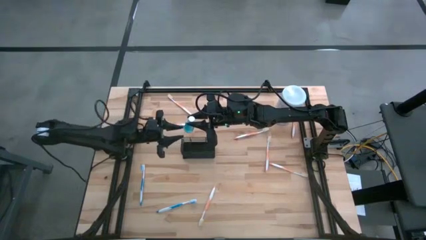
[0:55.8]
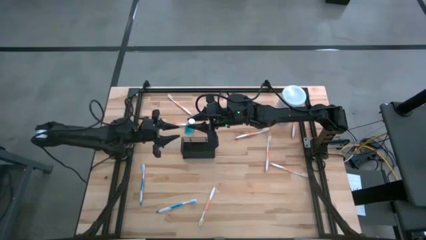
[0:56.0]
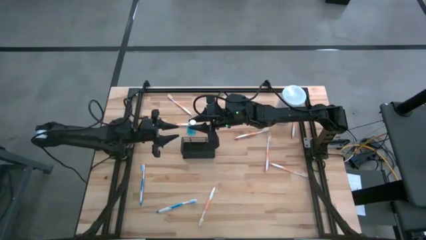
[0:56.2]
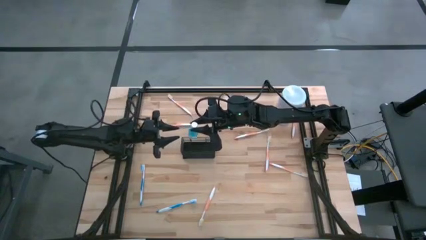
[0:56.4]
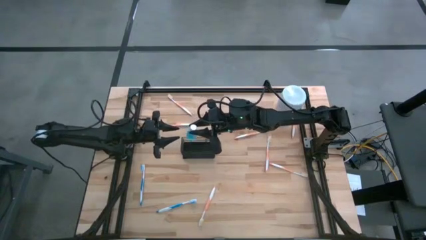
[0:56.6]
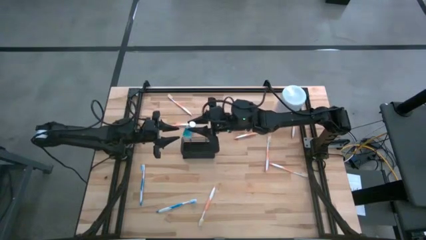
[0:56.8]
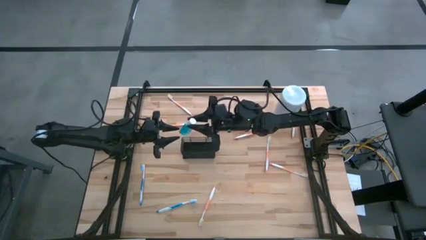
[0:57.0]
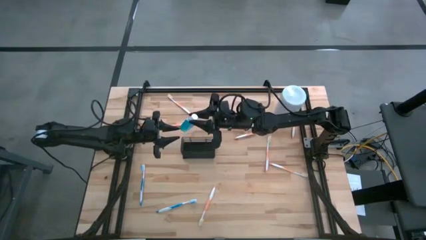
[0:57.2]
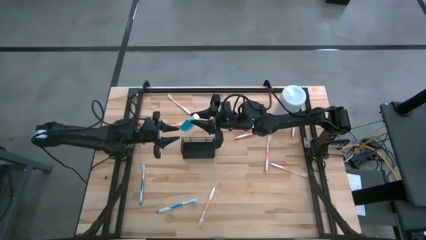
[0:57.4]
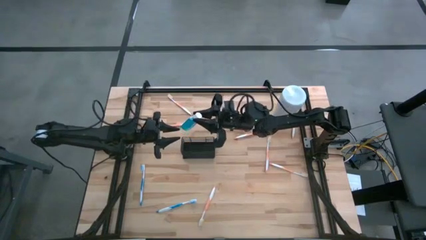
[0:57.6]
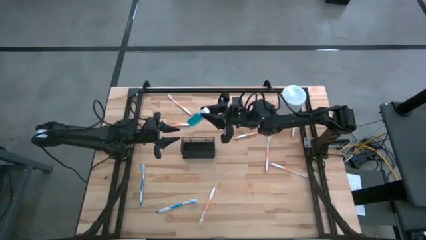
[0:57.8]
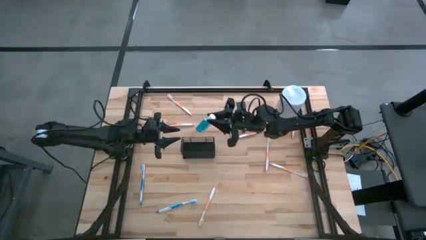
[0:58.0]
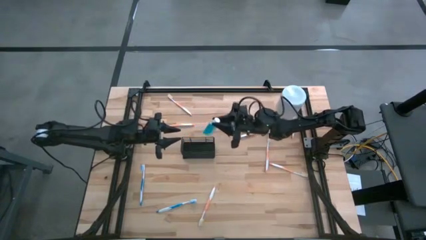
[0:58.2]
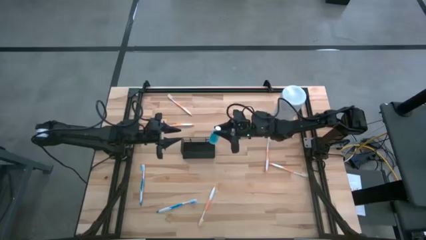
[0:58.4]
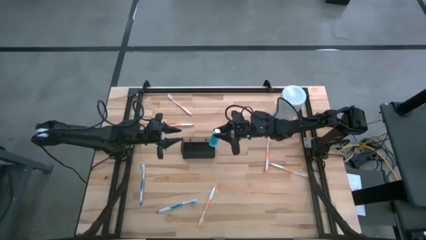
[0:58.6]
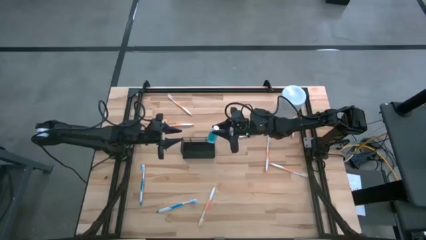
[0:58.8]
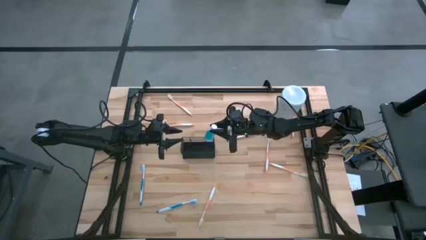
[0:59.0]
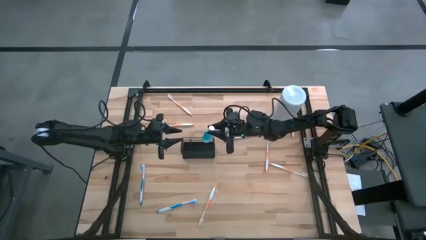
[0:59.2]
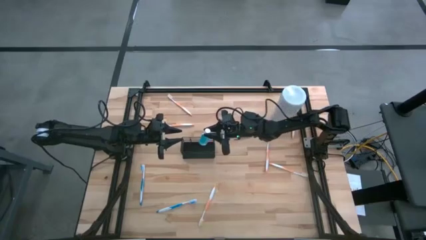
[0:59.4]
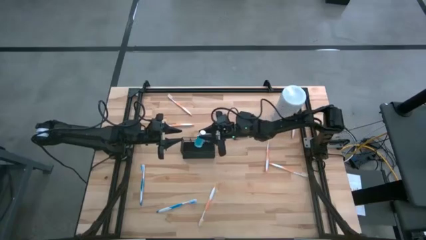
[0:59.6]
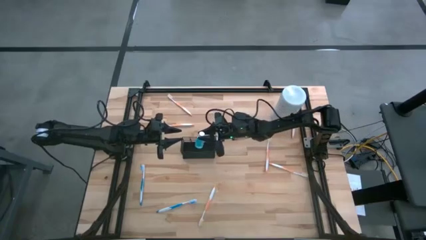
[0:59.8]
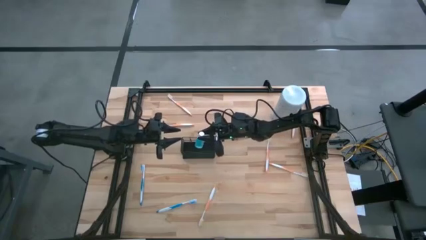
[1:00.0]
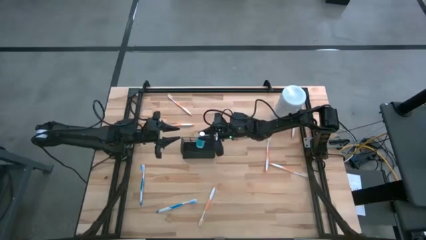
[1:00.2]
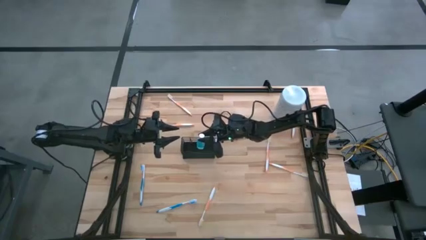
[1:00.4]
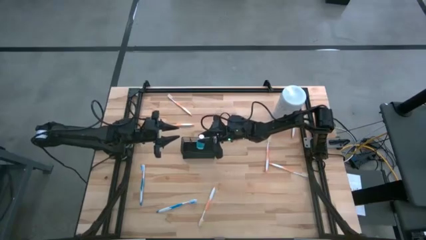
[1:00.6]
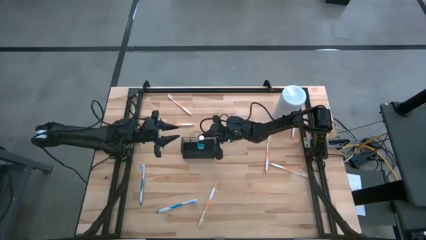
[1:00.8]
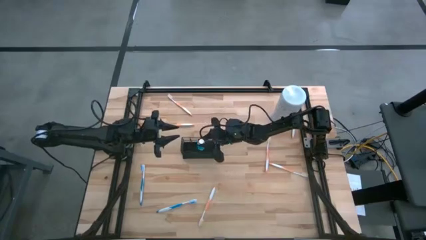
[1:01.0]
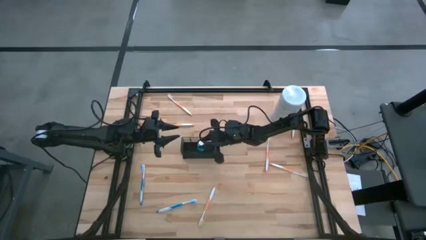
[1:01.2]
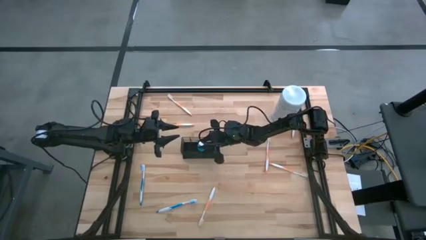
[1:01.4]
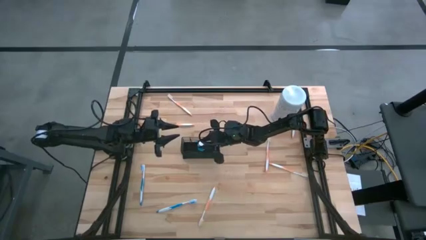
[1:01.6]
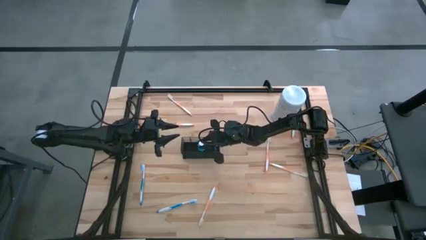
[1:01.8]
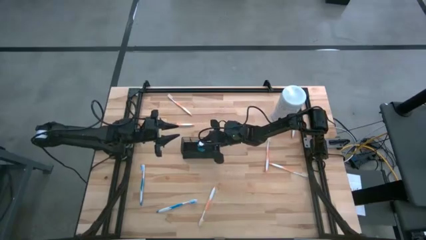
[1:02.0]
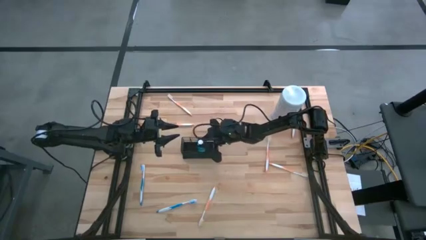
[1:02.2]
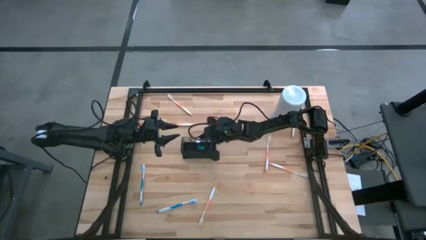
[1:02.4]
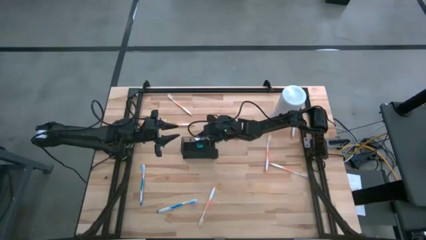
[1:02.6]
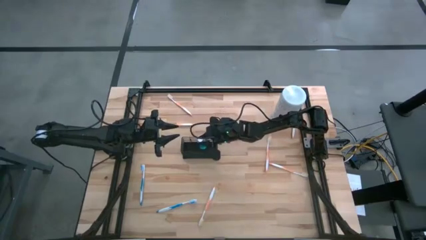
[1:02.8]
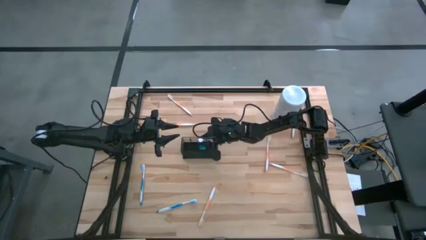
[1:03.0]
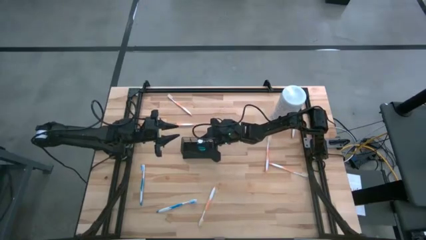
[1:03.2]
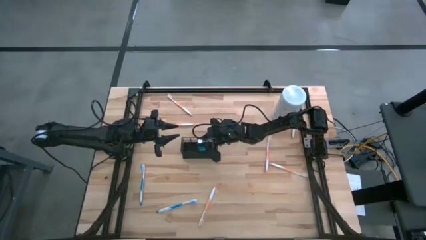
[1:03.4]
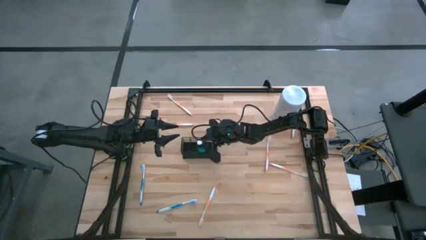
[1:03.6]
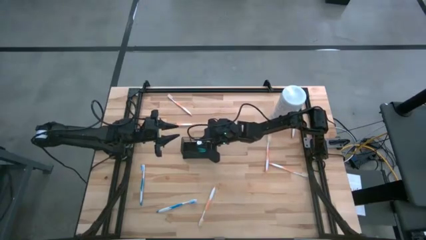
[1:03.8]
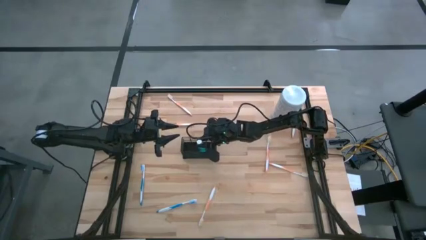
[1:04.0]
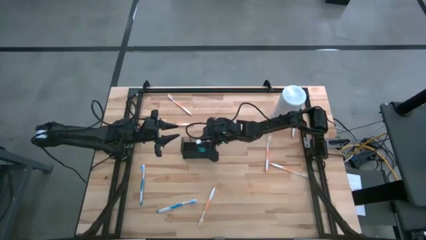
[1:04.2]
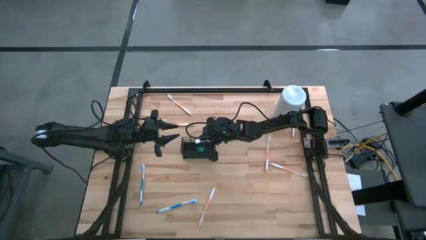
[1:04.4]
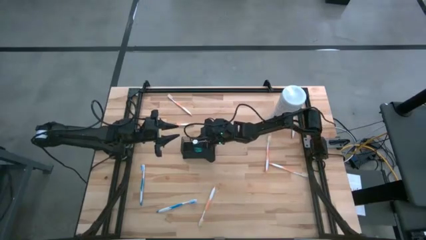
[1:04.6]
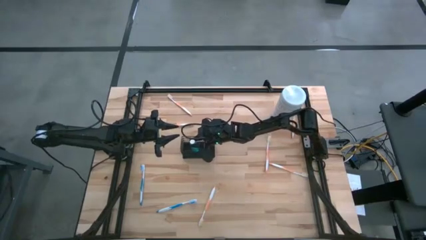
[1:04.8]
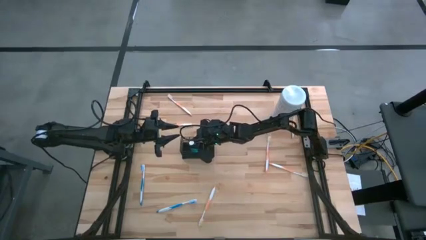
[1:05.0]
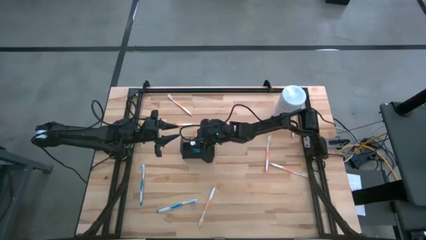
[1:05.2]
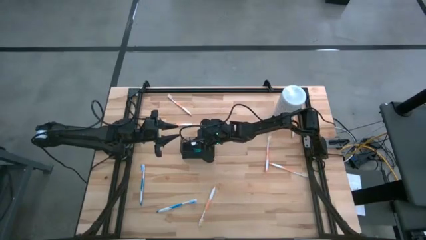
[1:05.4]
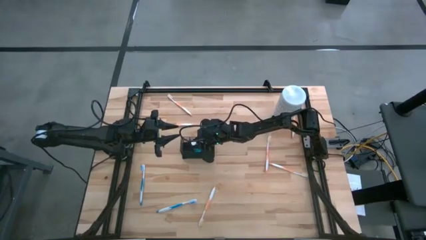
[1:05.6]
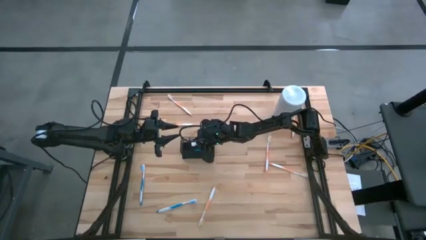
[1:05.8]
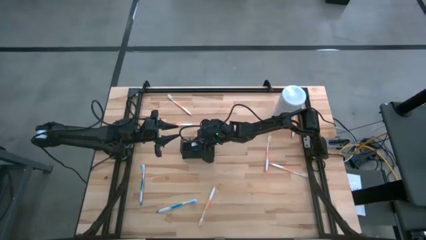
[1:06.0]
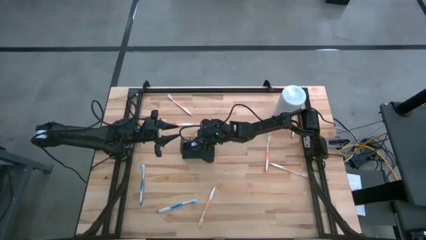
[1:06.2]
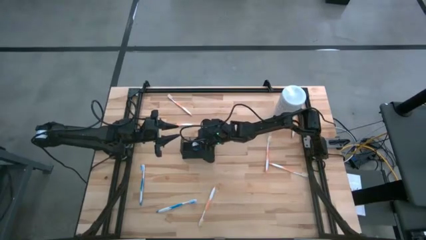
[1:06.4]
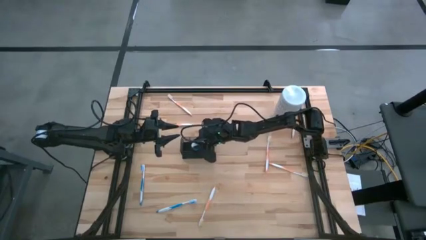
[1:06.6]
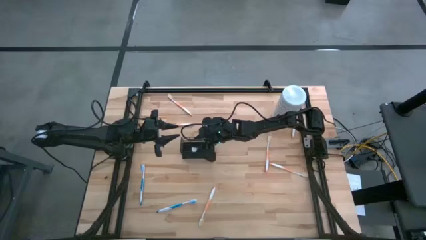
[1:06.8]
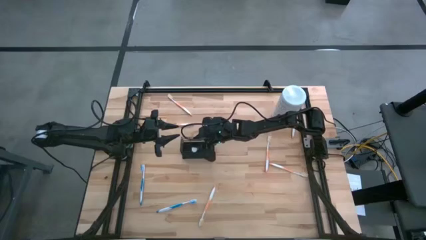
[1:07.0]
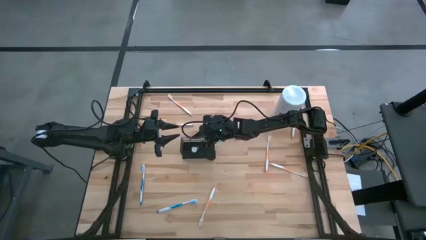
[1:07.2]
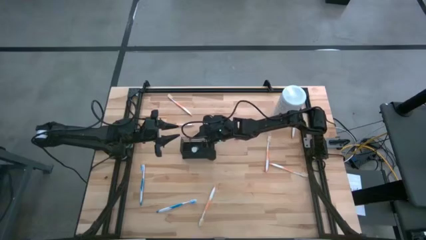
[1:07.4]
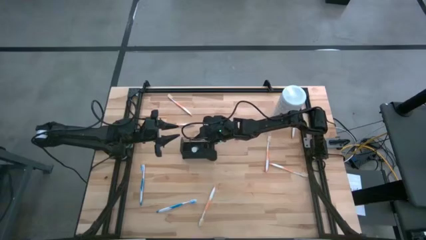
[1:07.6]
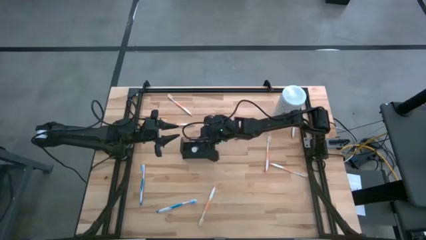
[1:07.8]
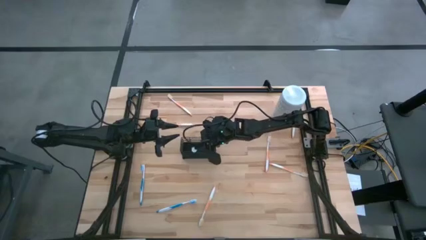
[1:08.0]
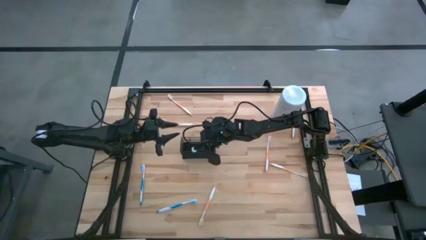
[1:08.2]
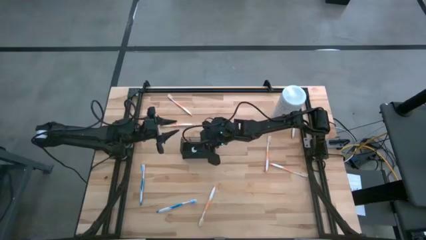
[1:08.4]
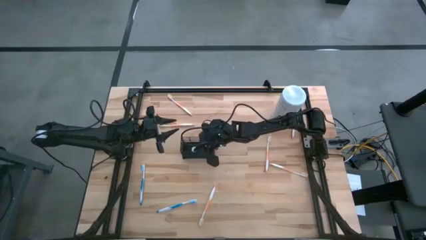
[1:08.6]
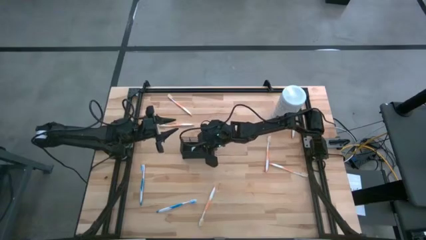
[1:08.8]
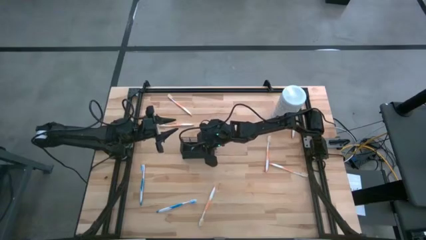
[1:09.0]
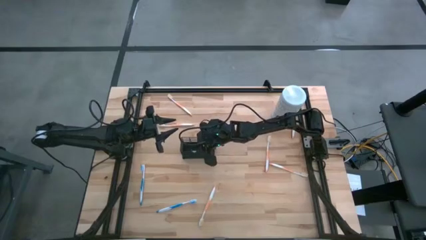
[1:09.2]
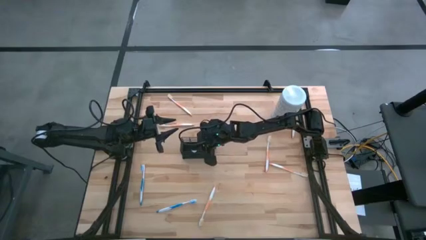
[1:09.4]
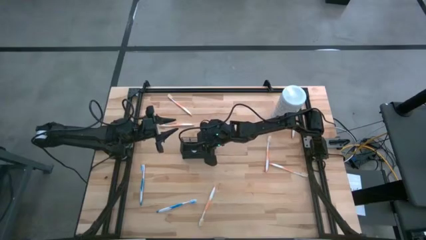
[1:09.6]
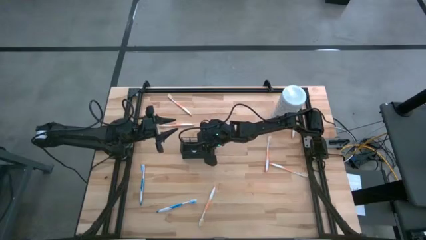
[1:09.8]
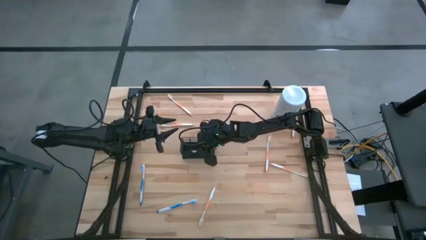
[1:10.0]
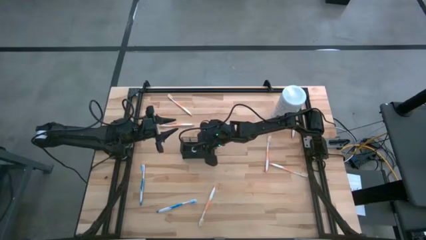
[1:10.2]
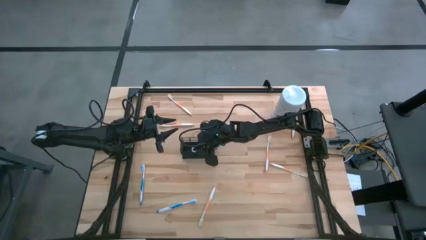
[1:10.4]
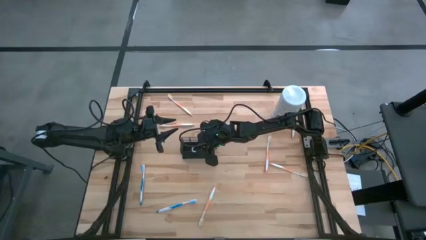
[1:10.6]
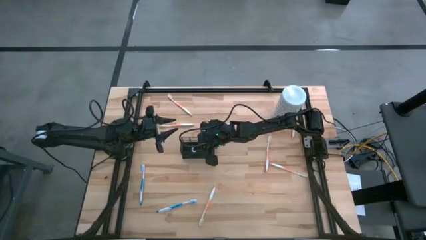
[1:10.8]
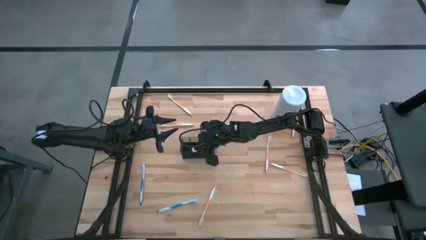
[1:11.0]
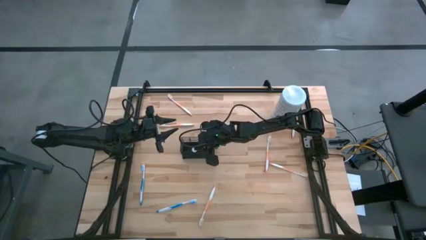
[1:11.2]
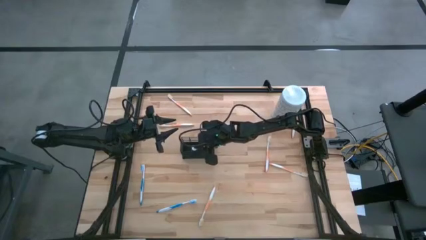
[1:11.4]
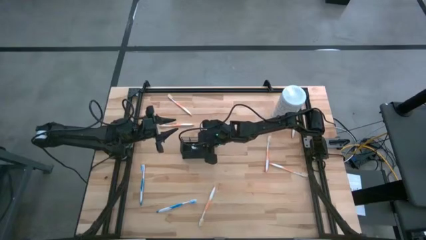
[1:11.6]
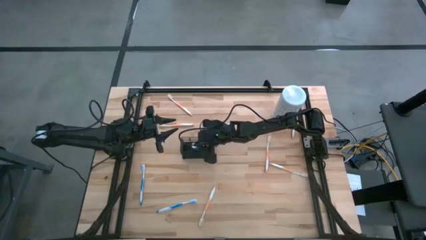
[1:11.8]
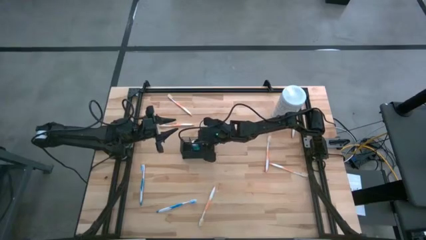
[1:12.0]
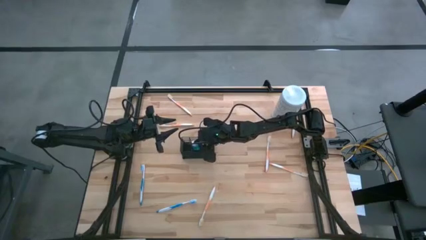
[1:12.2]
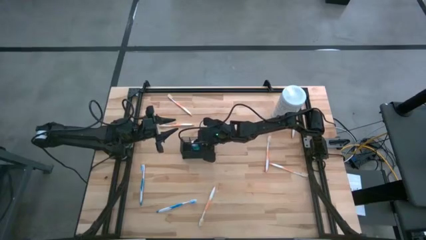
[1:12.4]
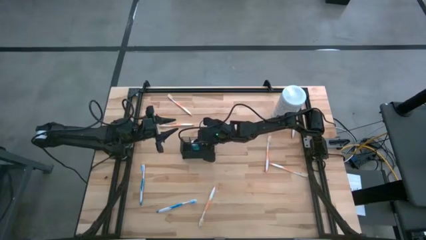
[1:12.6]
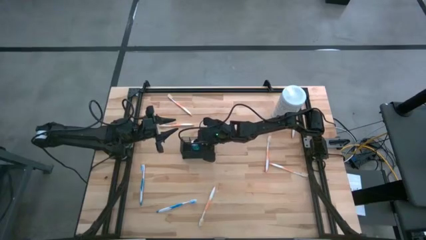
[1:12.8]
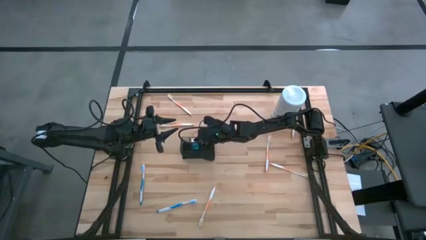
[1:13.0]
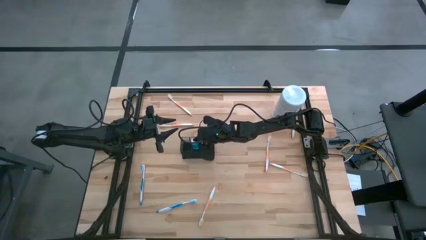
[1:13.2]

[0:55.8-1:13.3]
Task: Pick & Place toothbrushing station
Put the blue mouthwash into the middle section of the wire organizer
